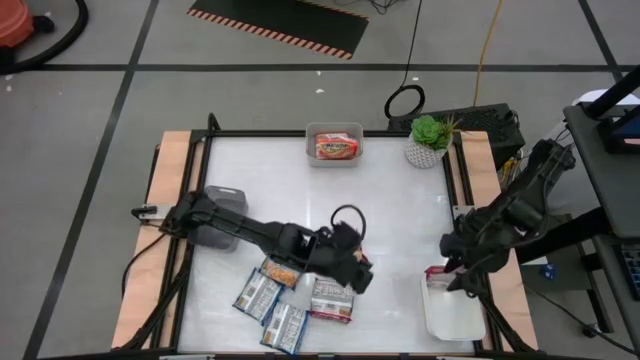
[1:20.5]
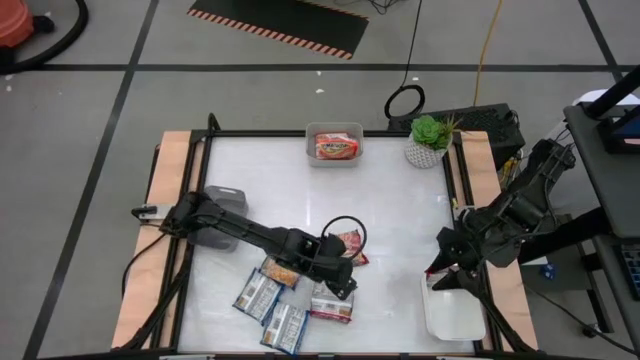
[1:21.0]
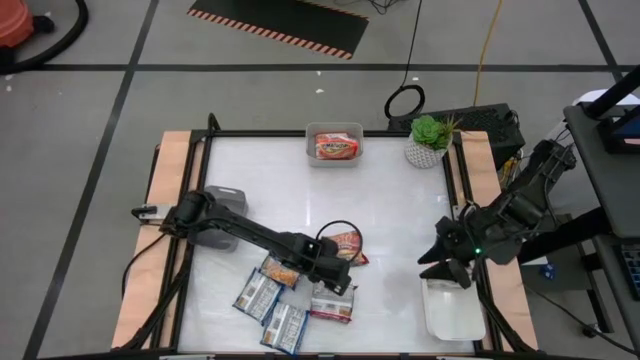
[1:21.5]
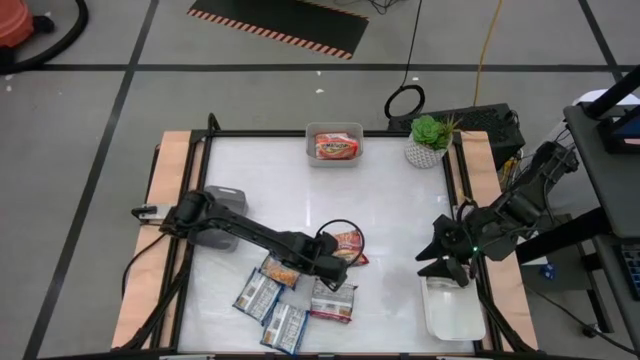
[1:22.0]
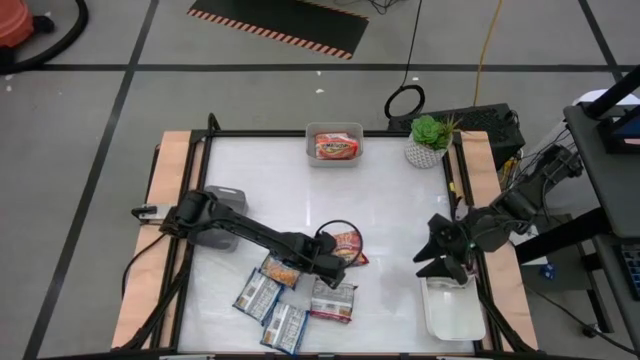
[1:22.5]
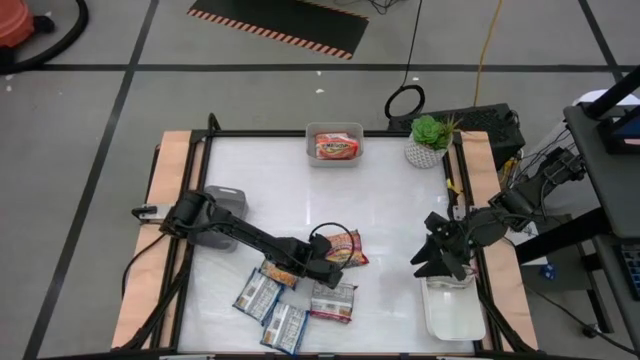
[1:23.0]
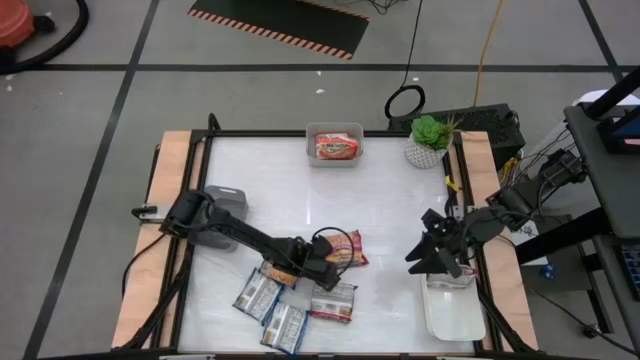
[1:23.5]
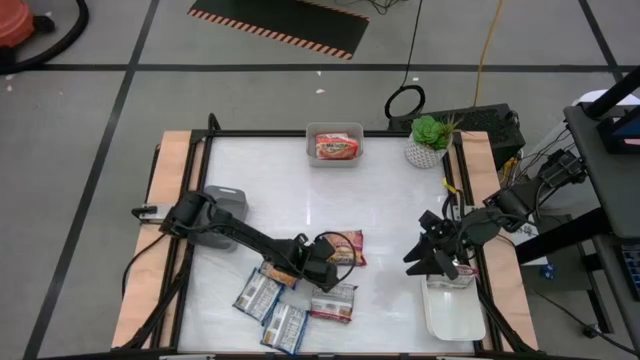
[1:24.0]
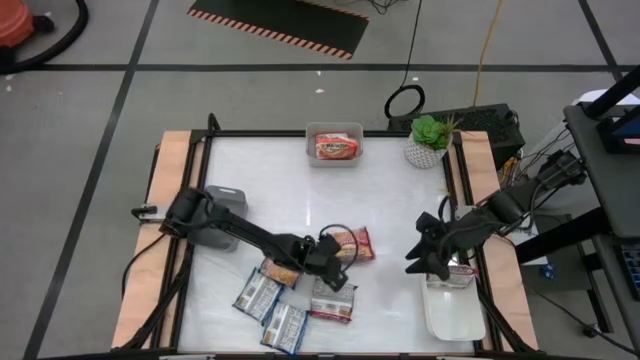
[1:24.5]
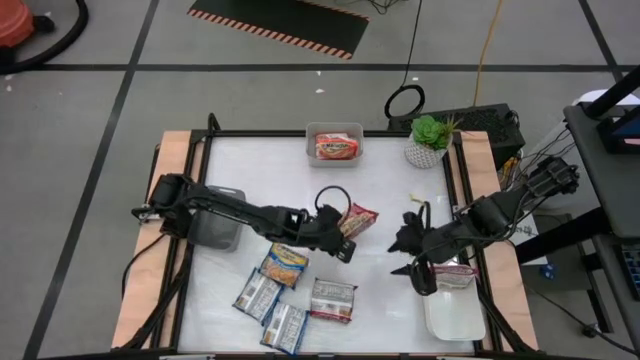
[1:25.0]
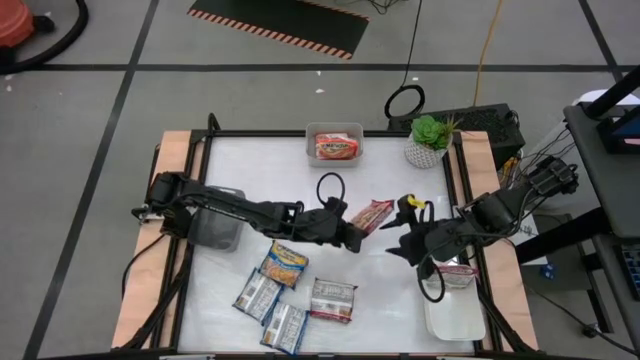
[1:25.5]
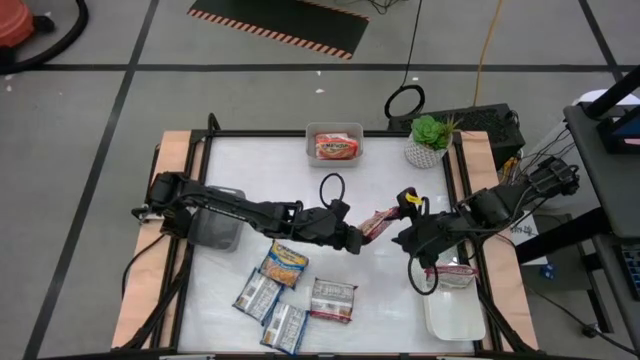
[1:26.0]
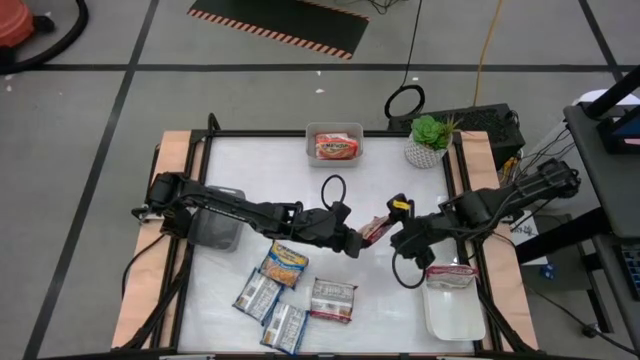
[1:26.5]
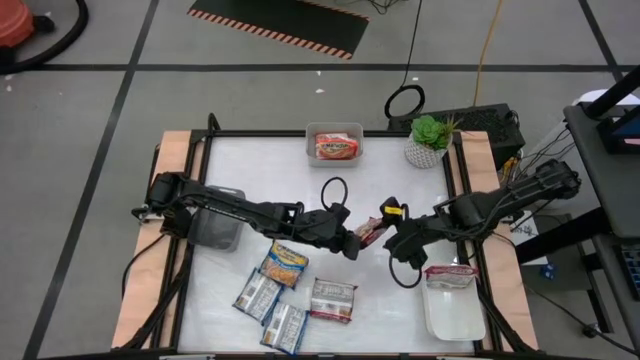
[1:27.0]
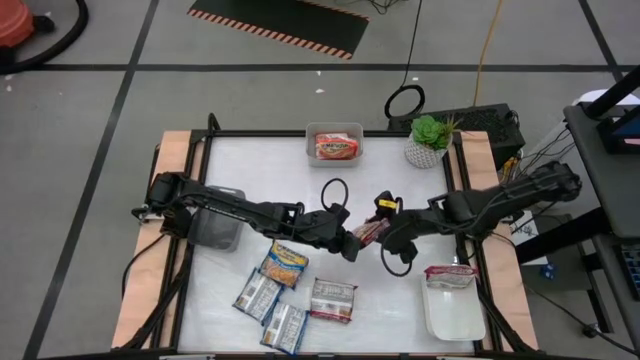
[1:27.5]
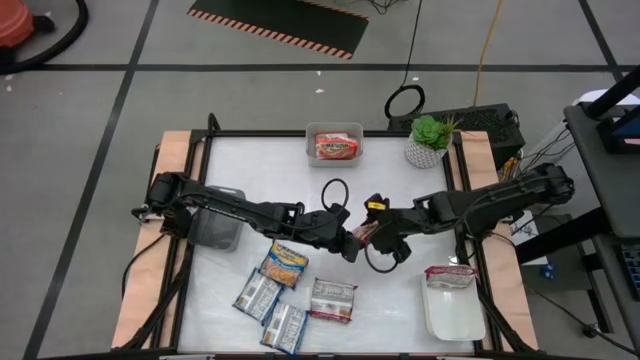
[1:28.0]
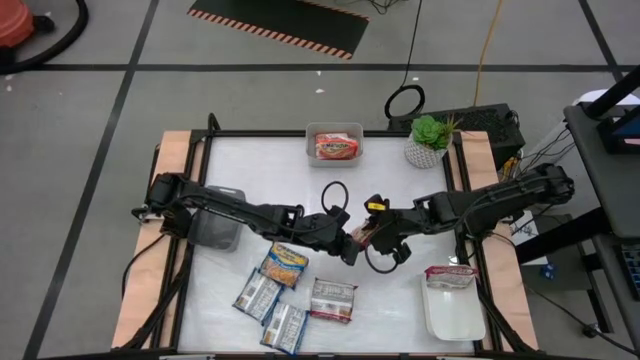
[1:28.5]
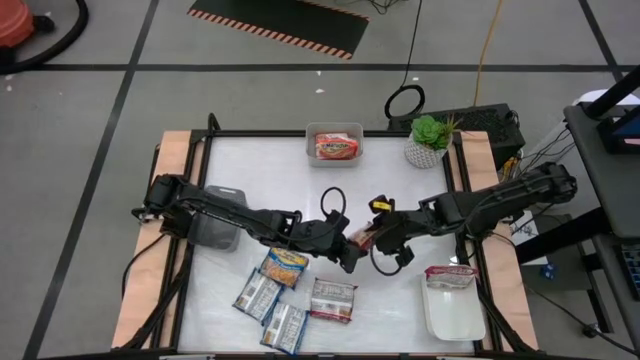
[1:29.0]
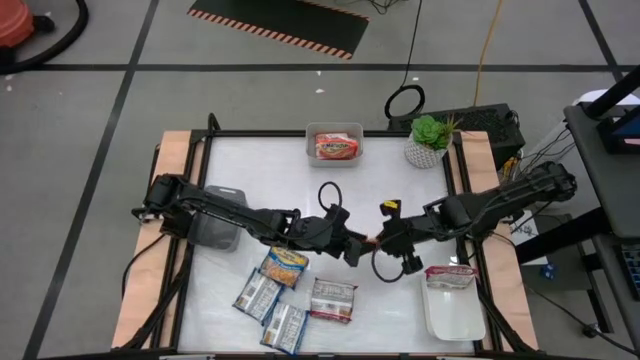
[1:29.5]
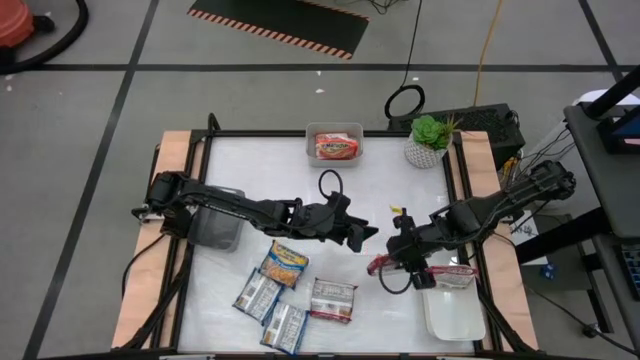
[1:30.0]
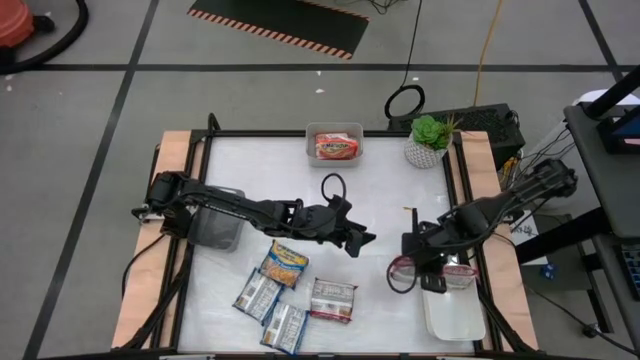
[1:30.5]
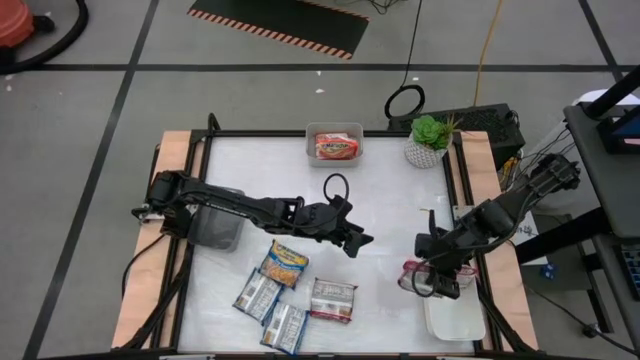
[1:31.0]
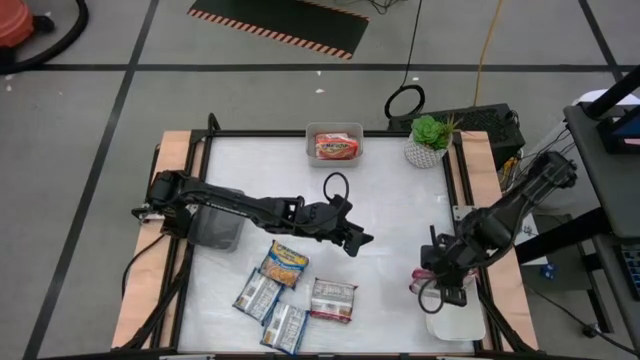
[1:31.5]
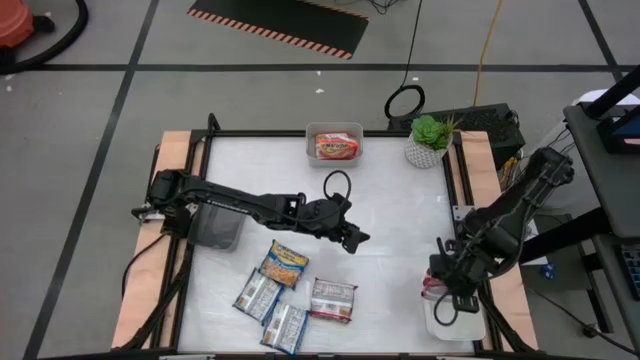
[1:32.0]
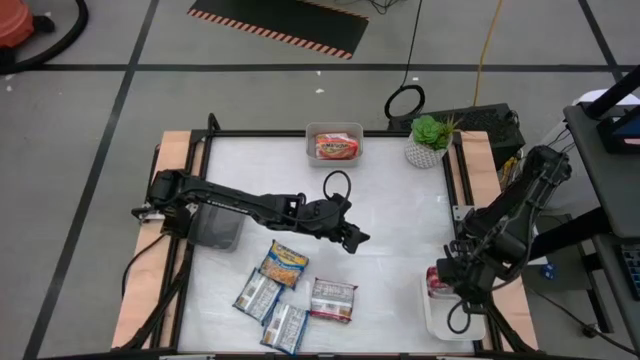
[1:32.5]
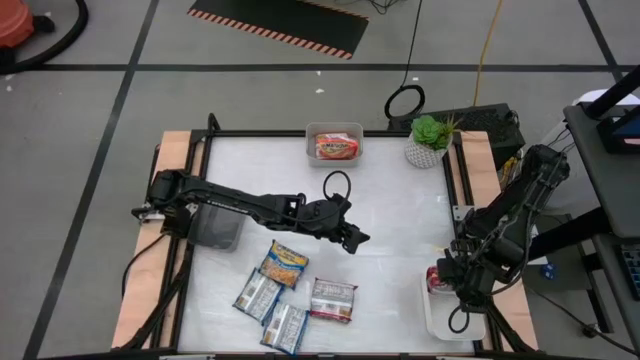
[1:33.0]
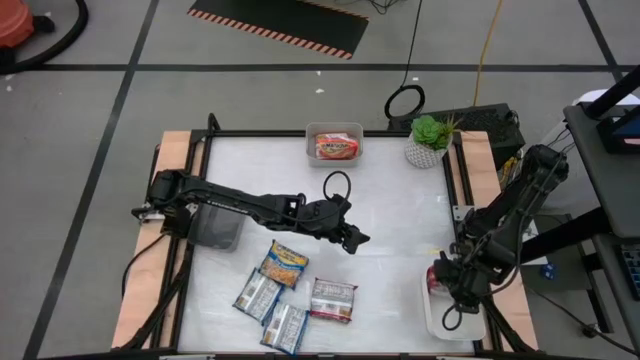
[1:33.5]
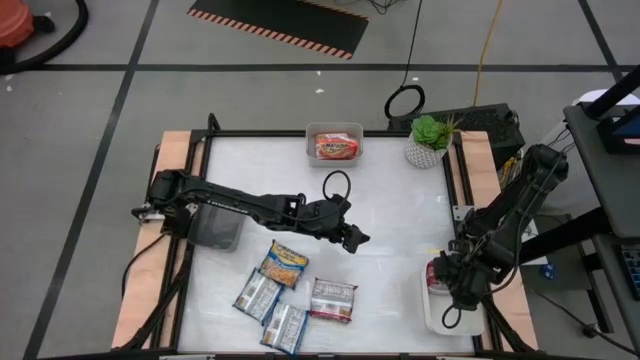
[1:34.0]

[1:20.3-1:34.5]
Task: Sort Maruchan noodles
Put the top red noodle pack into the white bin

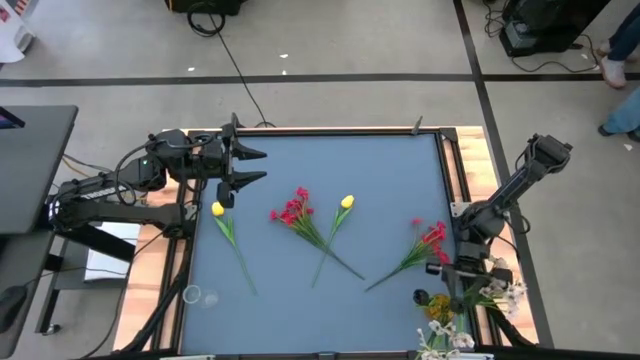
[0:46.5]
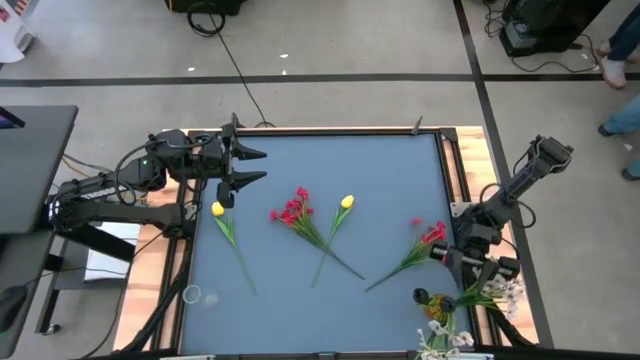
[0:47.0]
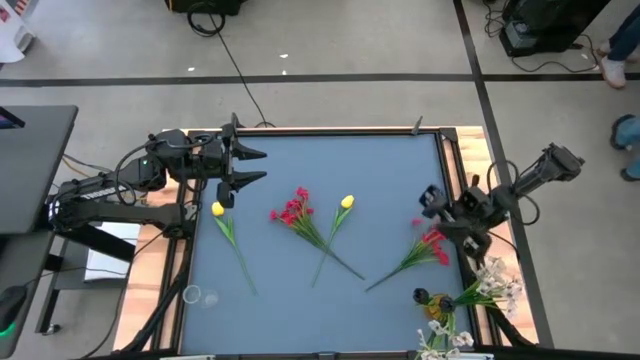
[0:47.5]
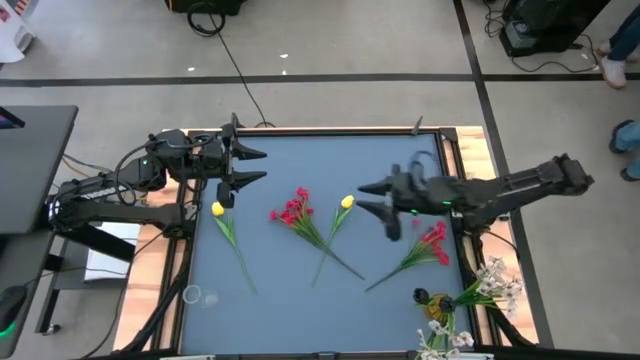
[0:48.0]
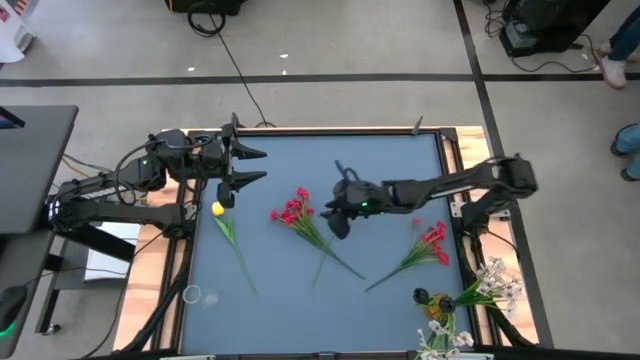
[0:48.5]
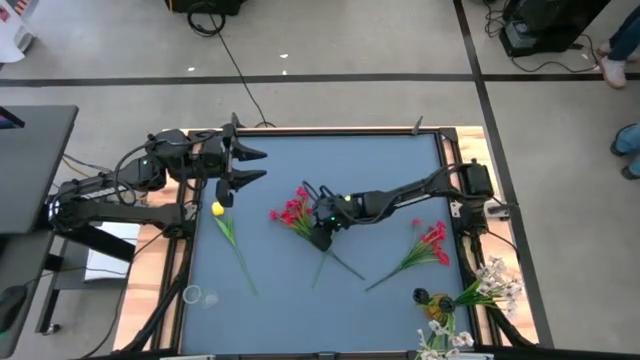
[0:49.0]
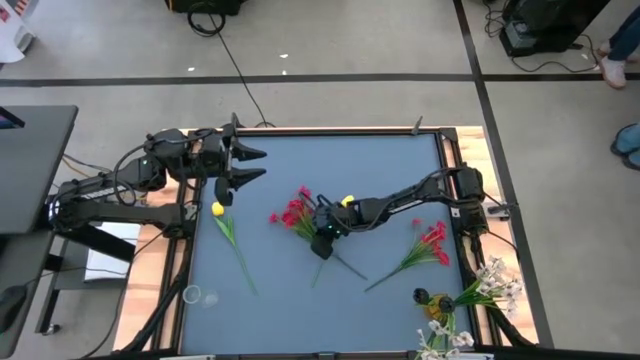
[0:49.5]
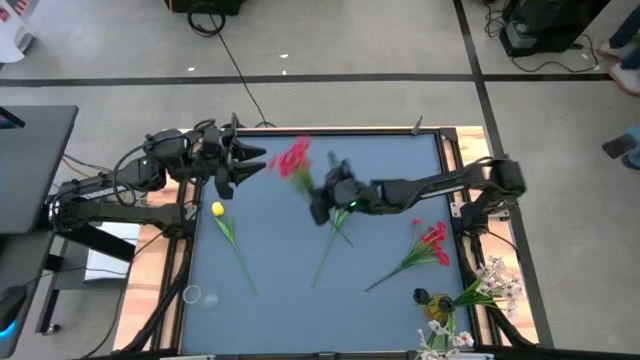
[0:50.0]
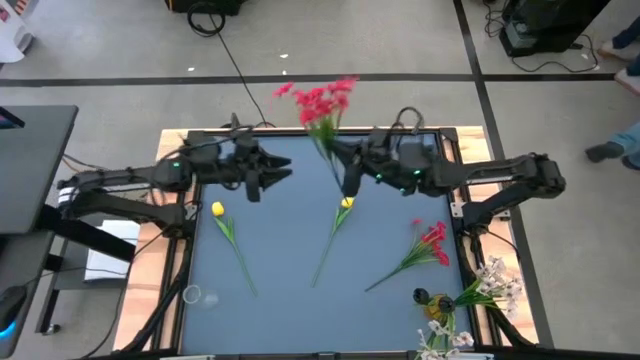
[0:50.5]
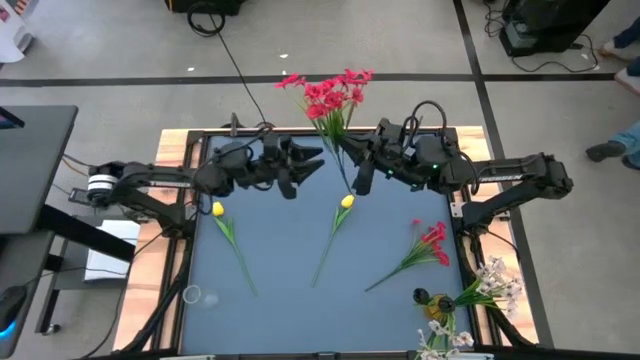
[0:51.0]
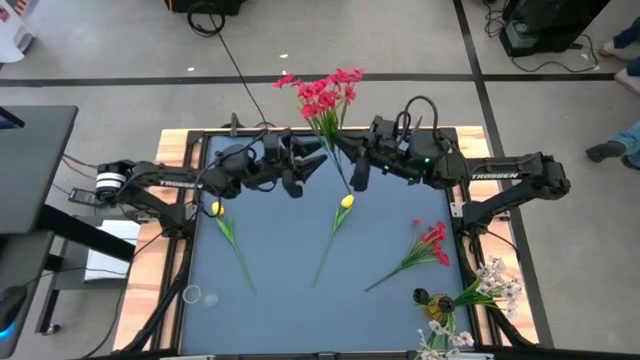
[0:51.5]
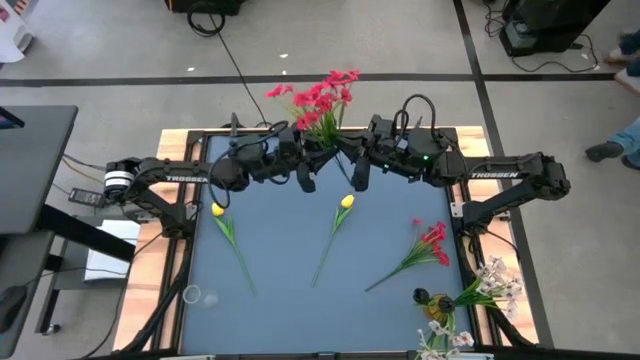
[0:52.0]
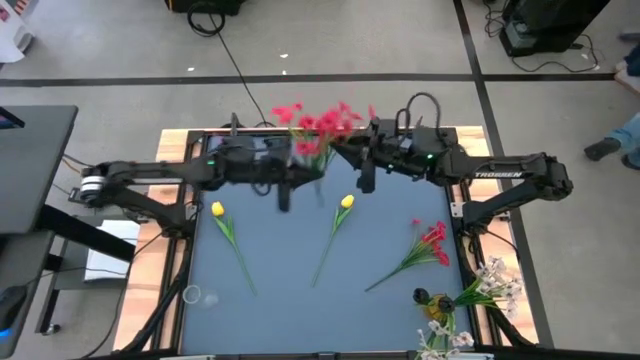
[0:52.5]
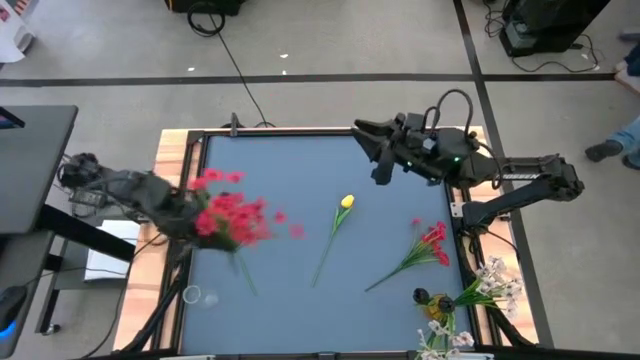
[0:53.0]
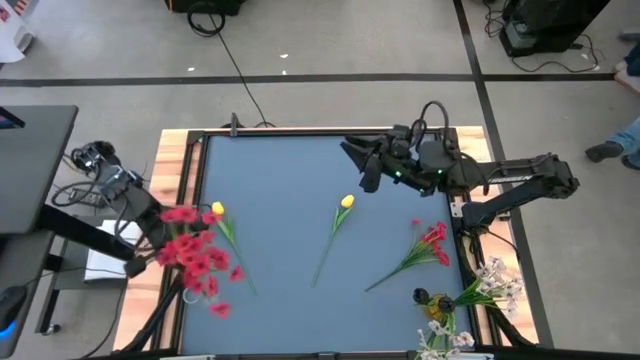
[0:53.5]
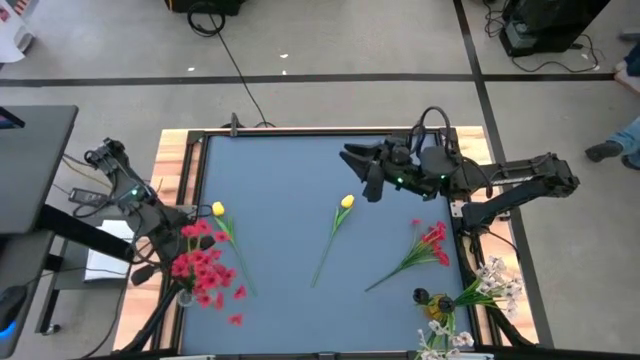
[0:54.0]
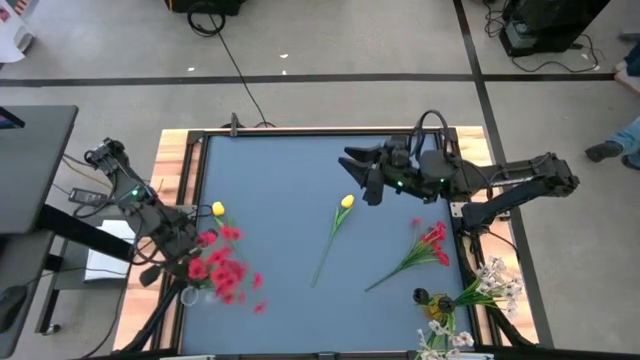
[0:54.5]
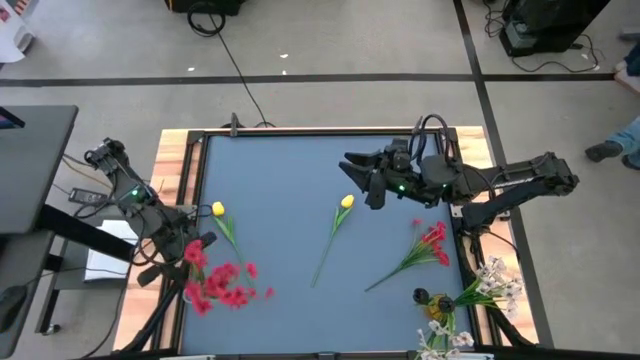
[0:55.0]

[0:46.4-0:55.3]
Task: Sort flowers into vase by color
Put the left red flower into the transparent flower vase
